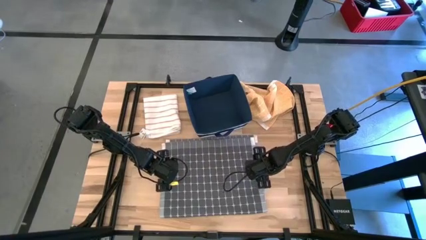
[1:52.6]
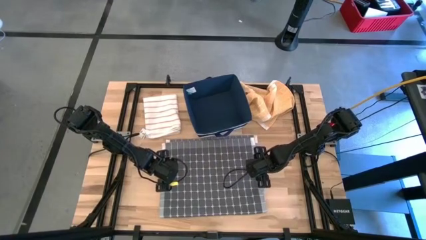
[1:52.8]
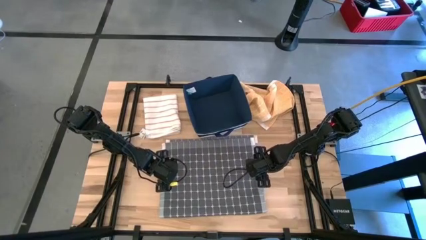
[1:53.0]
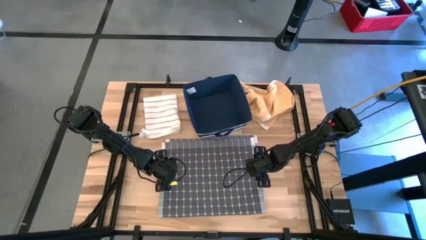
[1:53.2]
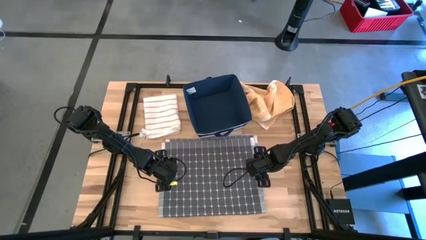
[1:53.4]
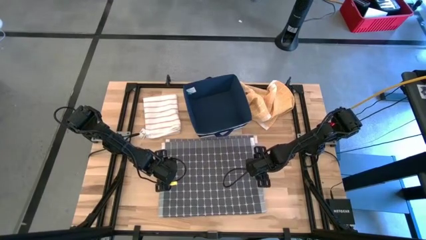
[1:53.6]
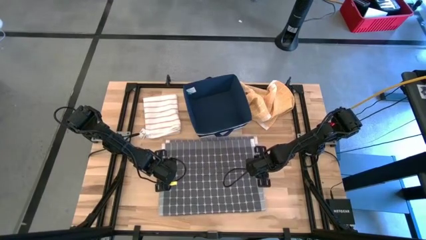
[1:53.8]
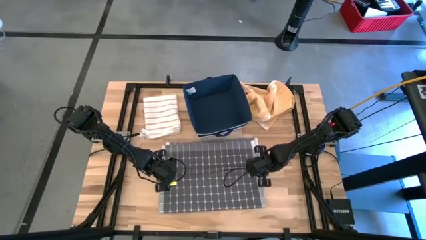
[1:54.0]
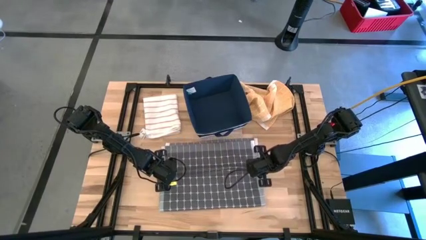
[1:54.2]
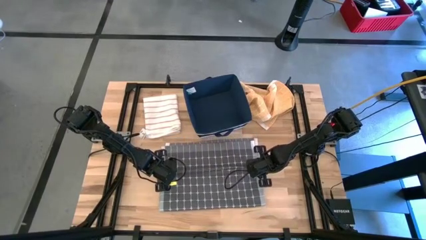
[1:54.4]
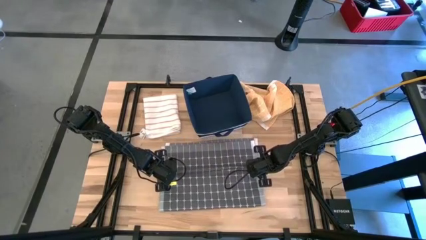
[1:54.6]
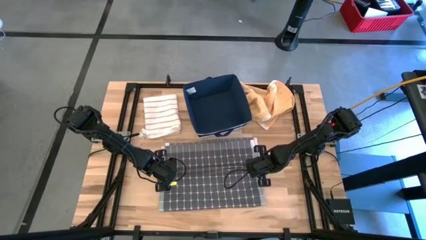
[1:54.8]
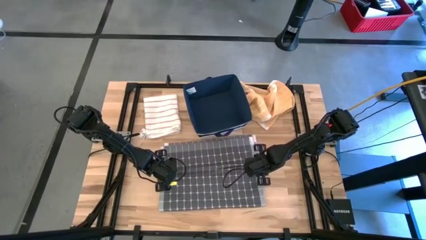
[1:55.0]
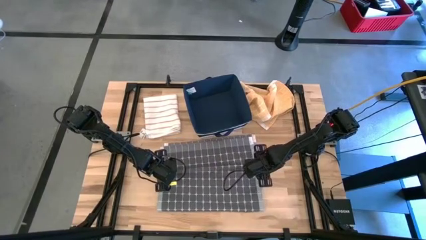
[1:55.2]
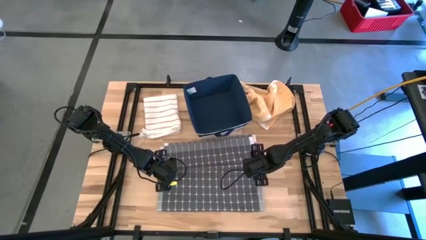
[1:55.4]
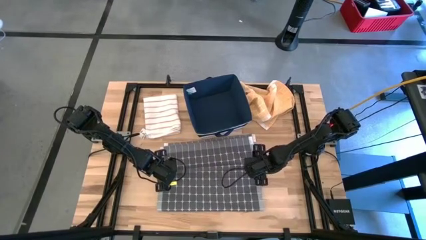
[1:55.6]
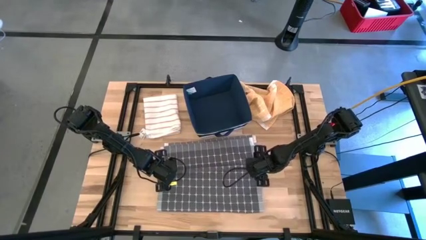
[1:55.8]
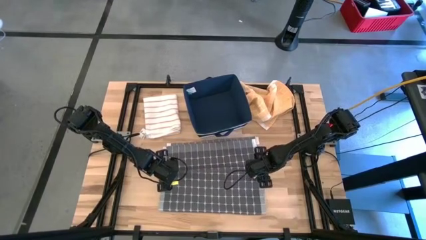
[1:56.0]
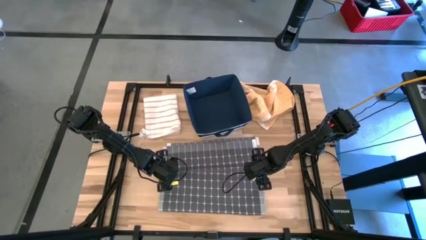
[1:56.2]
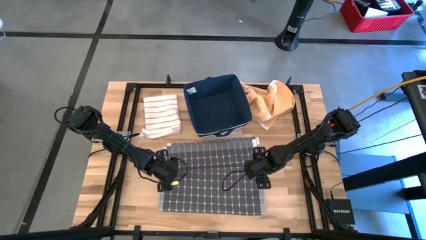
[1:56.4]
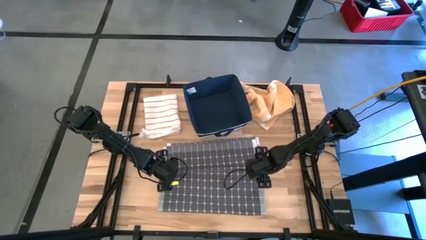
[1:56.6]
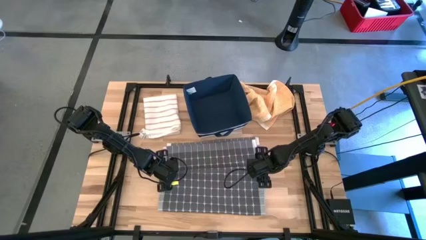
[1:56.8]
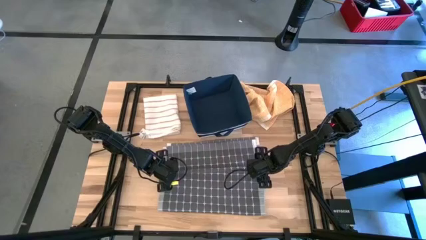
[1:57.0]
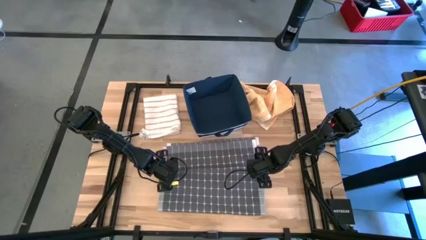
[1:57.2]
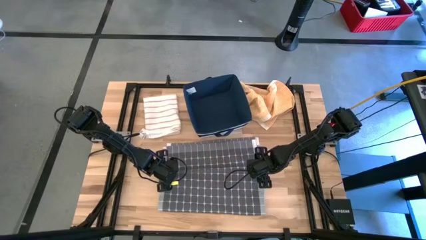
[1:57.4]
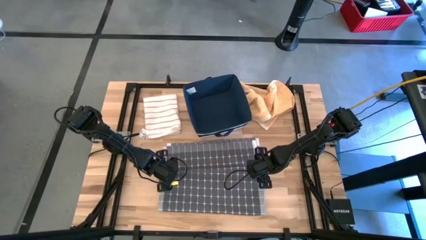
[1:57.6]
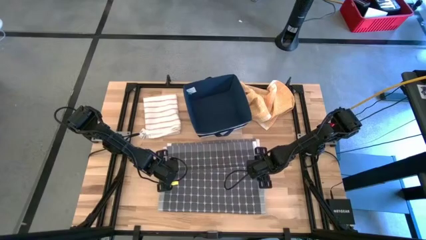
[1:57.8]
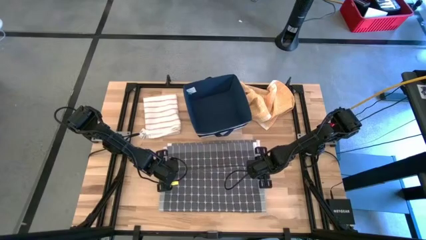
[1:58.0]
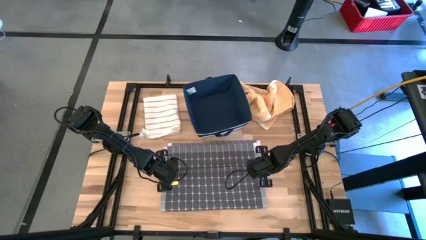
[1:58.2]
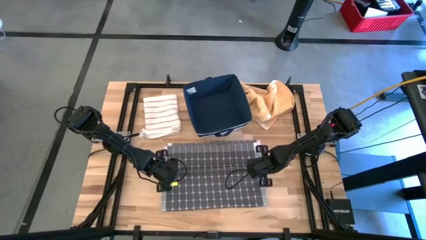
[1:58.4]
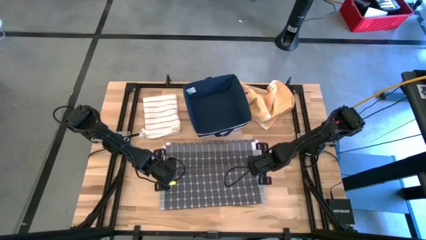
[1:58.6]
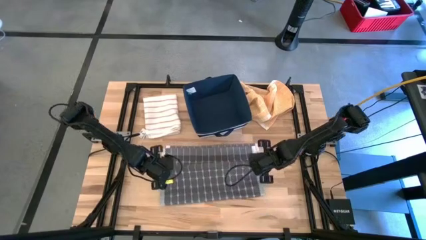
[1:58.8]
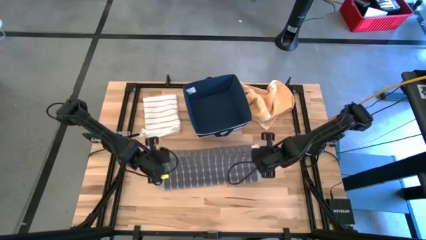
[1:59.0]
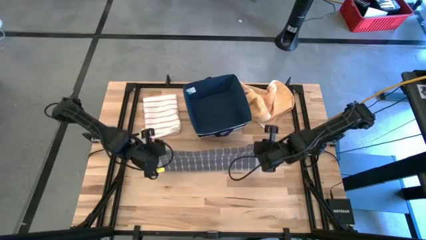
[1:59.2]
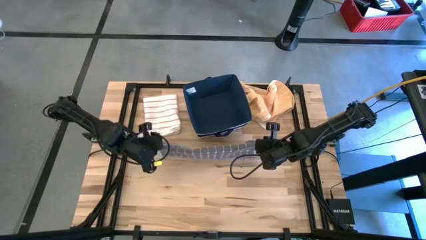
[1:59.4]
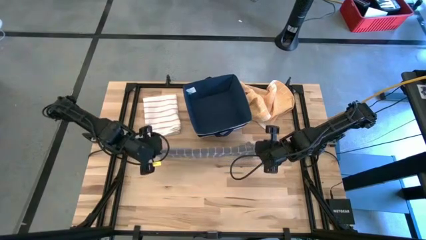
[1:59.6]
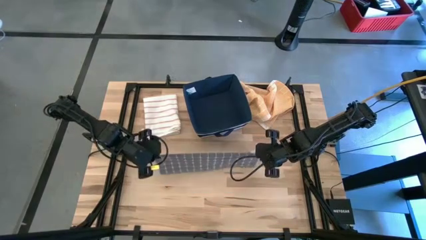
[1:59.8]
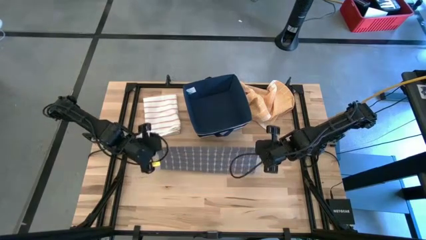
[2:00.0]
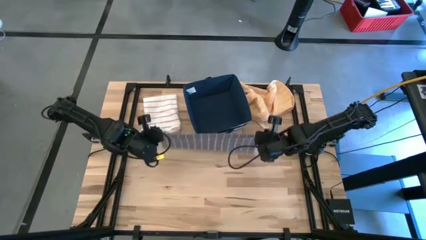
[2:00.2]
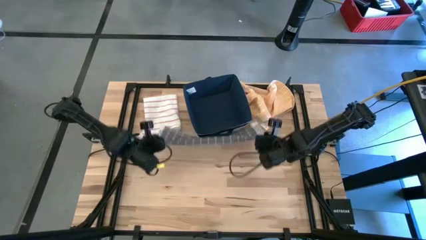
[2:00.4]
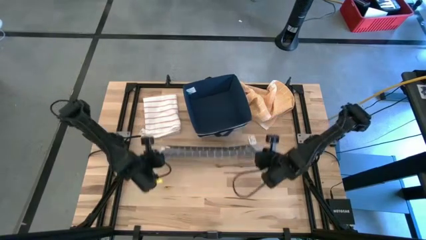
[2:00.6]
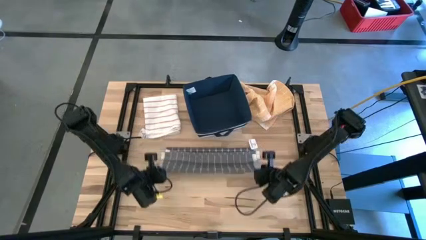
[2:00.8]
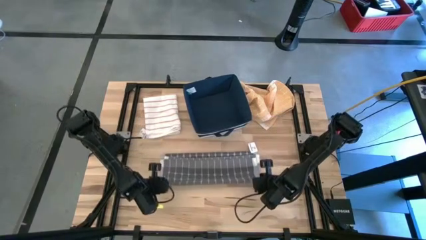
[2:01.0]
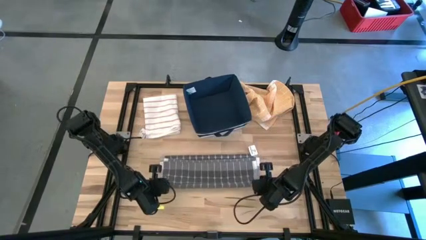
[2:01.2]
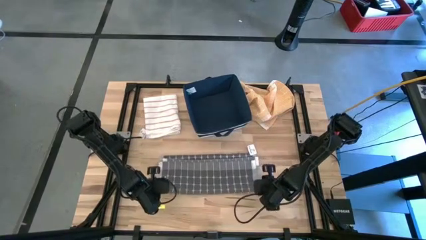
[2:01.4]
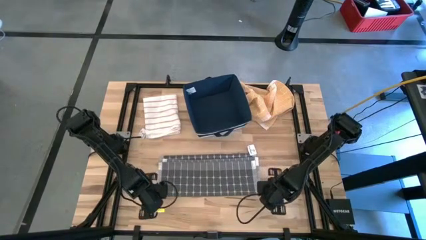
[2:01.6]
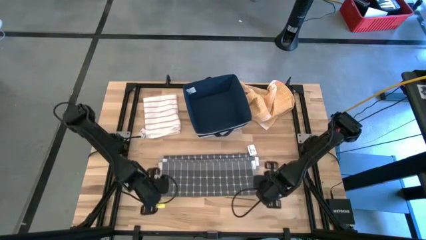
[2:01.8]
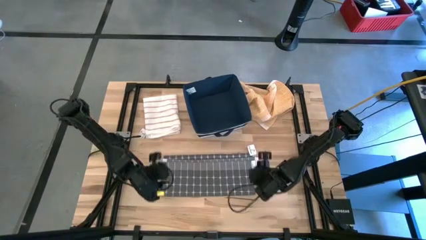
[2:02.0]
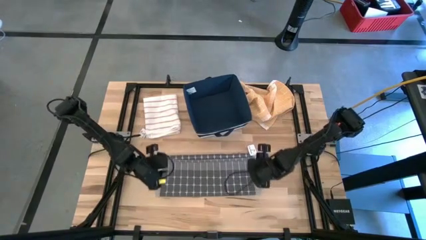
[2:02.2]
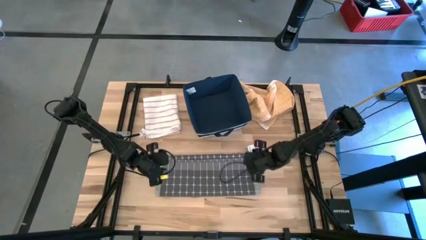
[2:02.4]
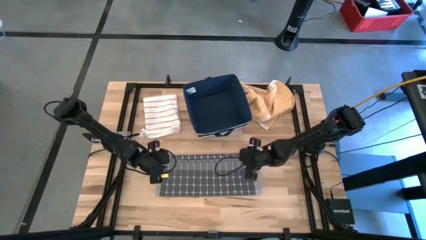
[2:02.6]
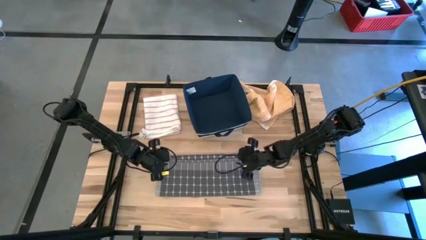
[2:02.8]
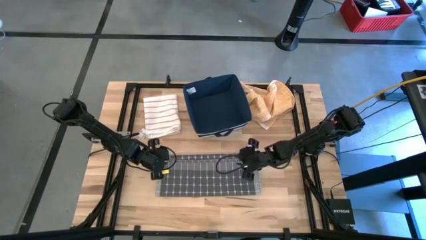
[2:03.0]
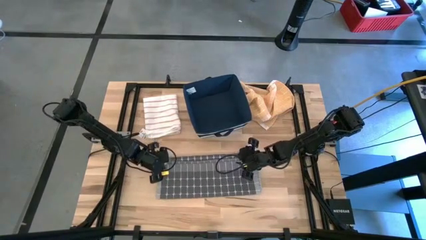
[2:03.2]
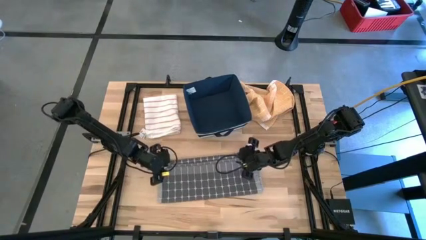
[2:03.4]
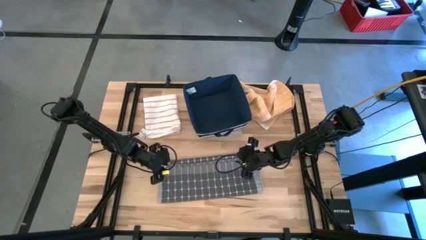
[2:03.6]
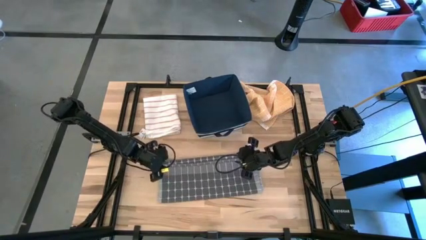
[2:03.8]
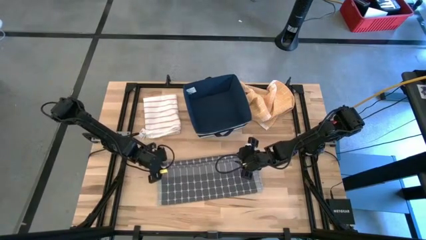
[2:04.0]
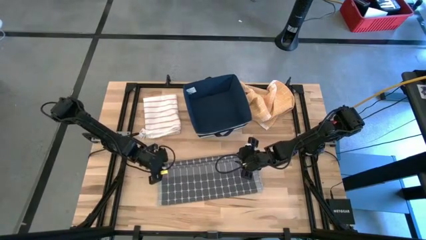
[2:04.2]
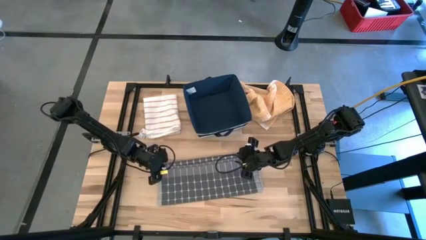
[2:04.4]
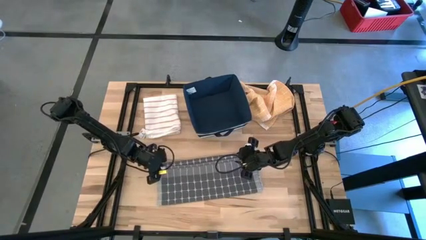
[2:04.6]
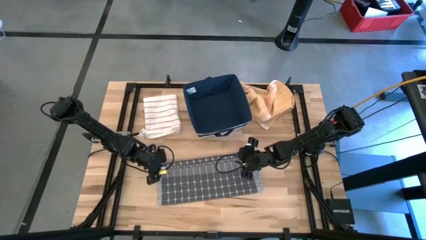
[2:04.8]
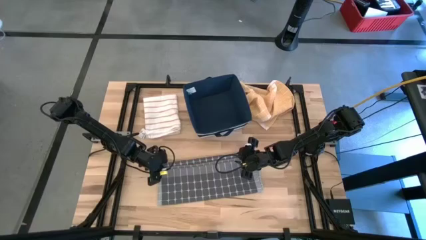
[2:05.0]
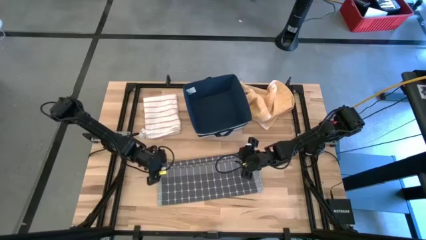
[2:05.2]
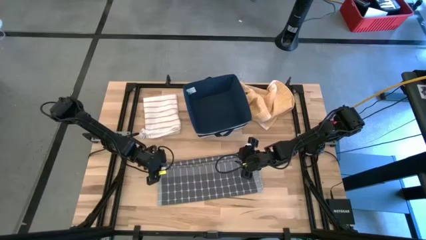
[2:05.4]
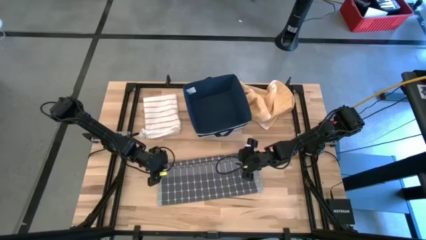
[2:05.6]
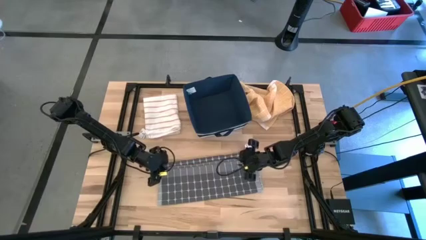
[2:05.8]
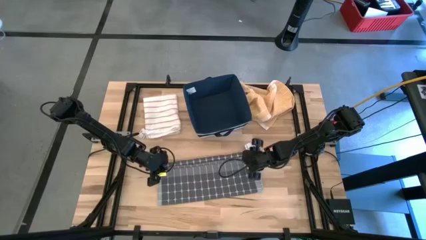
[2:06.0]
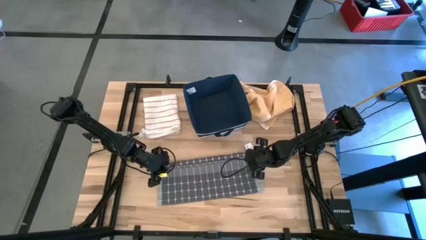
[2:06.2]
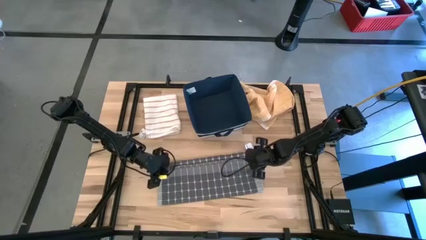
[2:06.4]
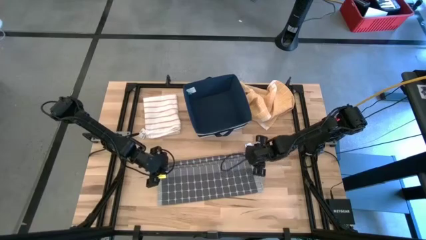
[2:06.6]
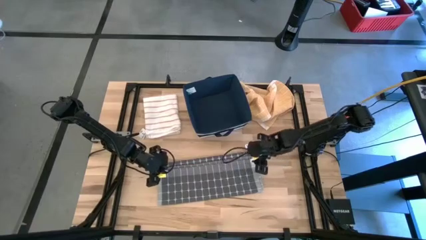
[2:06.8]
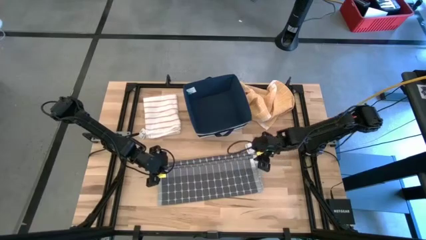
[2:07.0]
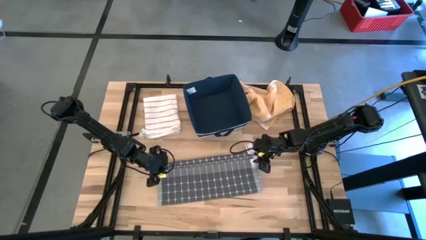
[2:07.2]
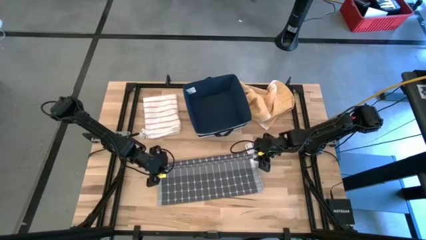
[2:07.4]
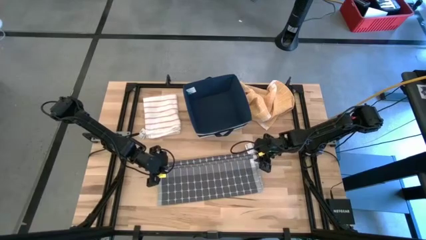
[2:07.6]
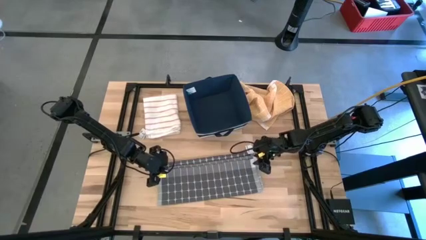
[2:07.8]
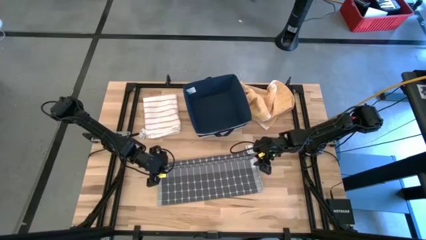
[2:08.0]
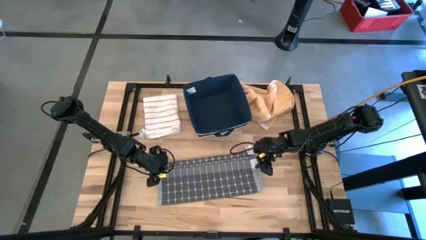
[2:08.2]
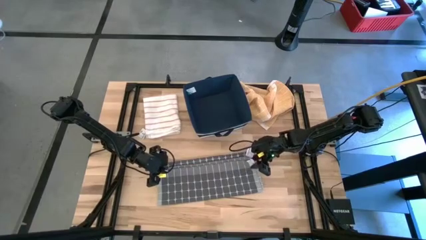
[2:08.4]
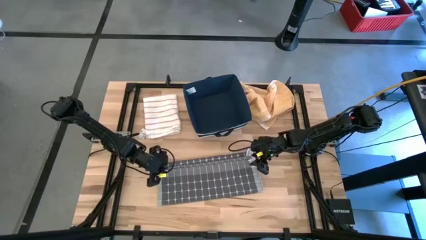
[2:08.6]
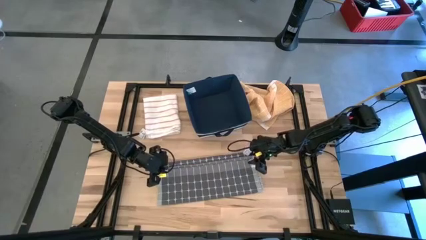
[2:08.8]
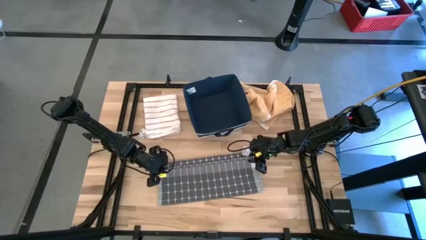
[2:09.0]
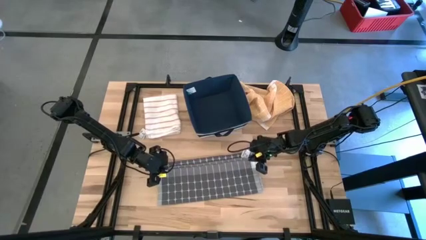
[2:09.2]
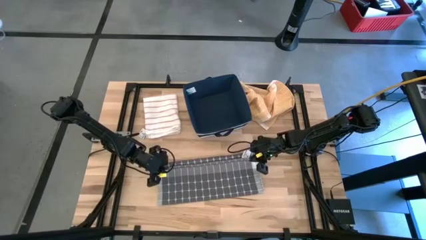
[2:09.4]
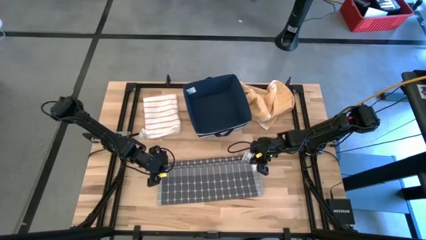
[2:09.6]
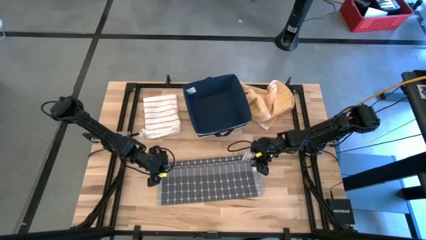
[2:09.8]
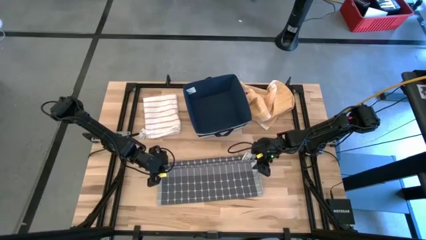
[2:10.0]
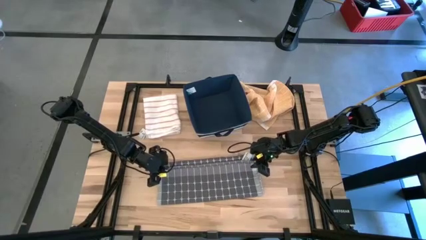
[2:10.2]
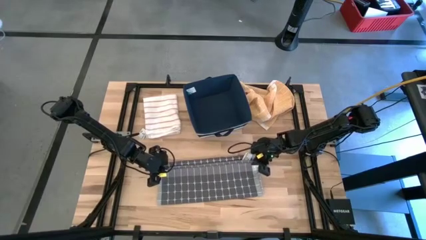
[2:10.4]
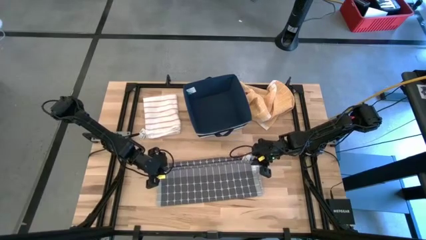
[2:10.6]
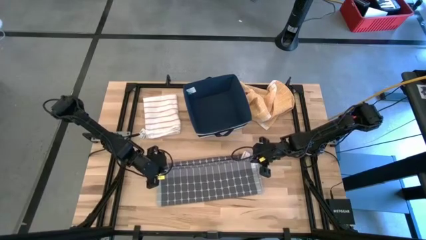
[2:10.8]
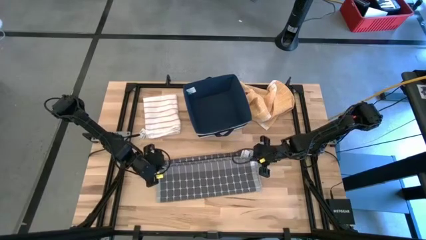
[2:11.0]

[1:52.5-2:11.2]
Task: Fold towel
Fold the black towel
